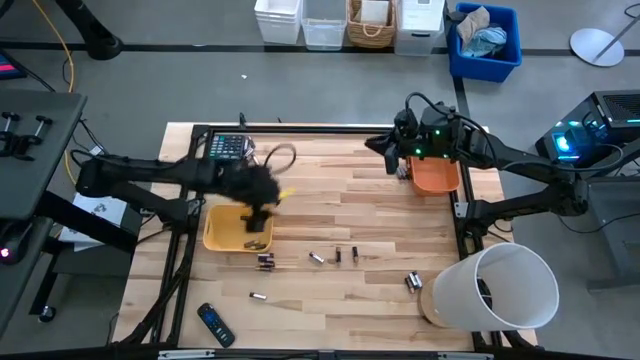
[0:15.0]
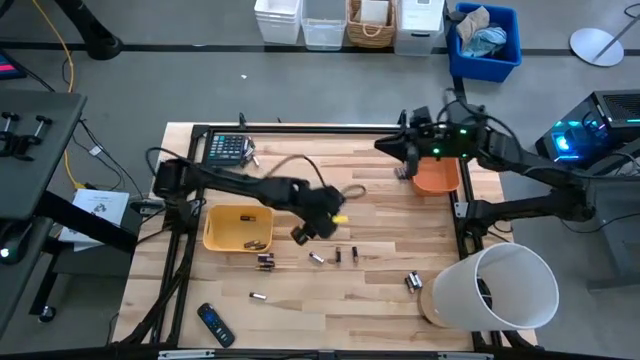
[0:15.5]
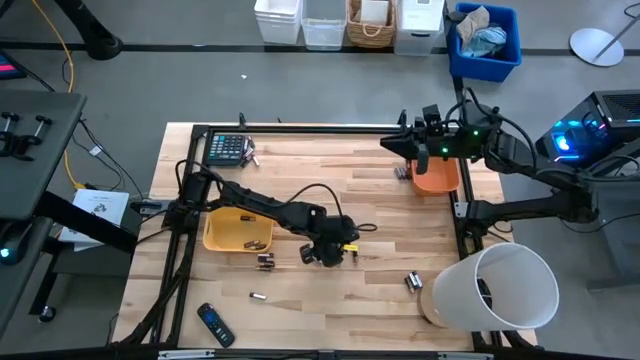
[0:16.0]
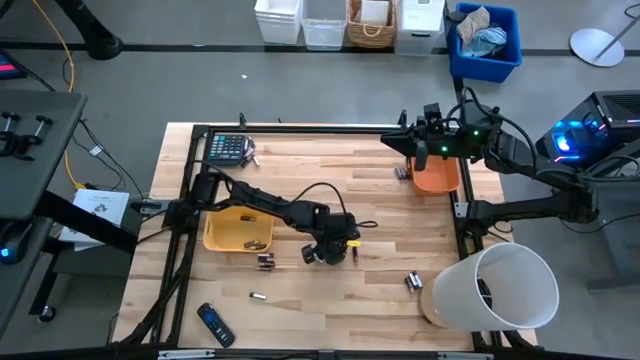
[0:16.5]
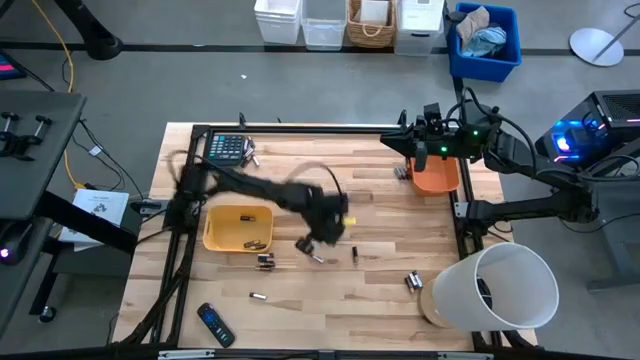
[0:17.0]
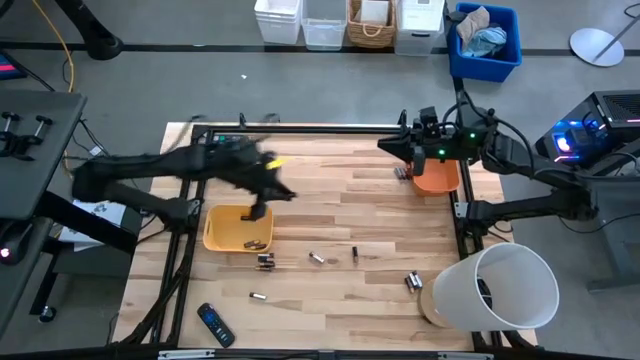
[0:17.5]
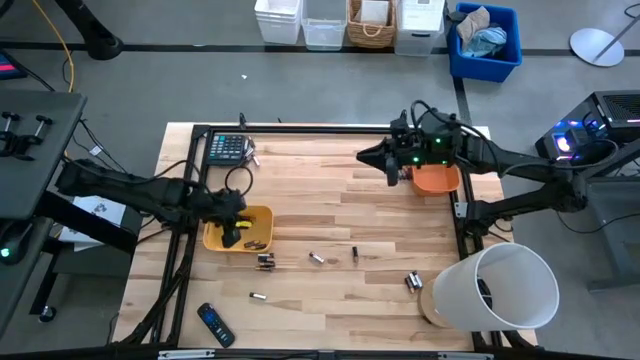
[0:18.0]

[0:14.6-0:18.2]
Task: Sort batteries
Put the black battery into the yellow bin

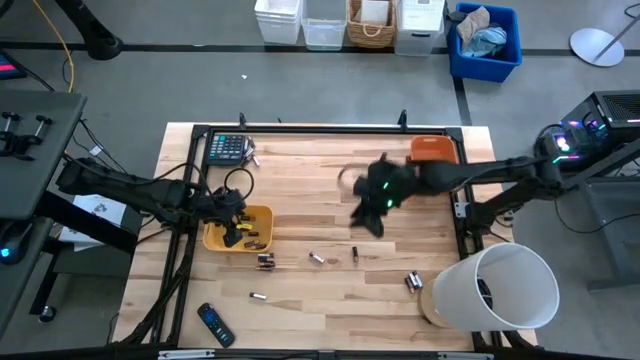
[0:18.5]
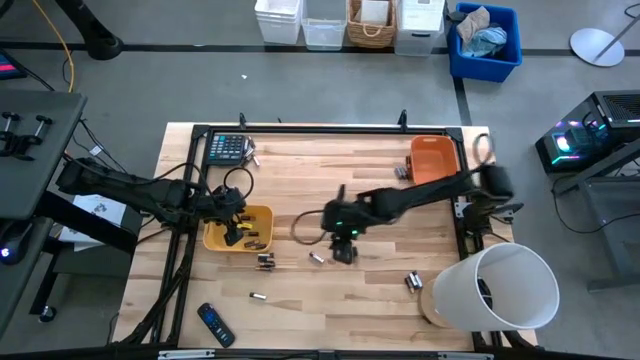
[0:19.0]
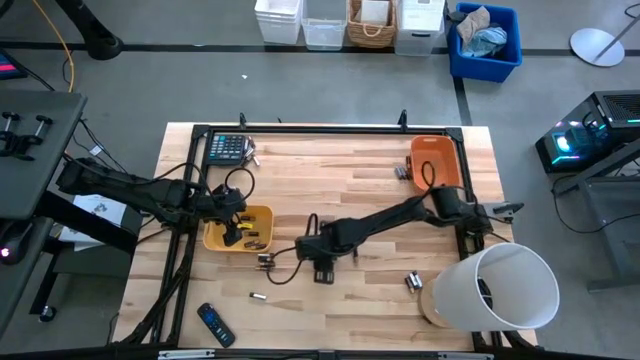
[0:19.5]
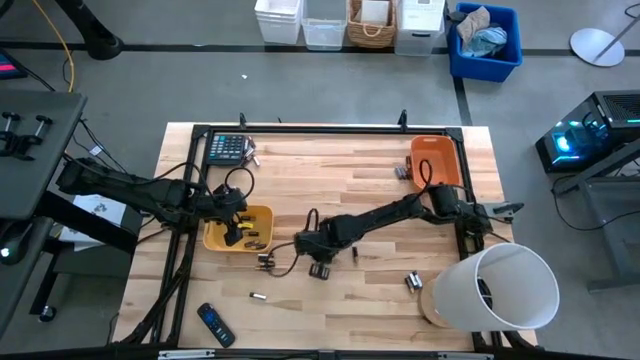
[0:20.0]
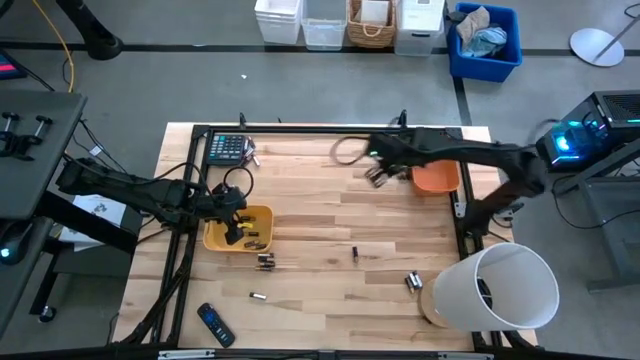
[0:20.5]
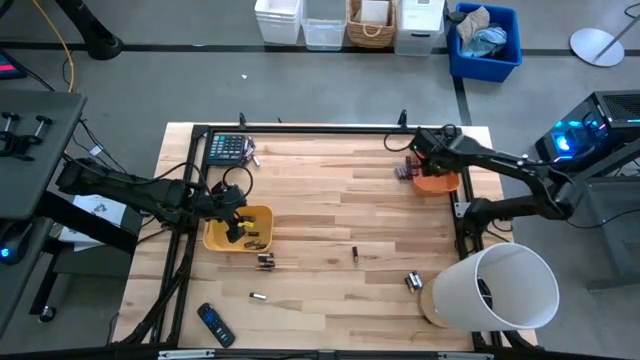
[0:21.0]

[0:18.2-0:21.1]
Put the silver battery into the orange bin

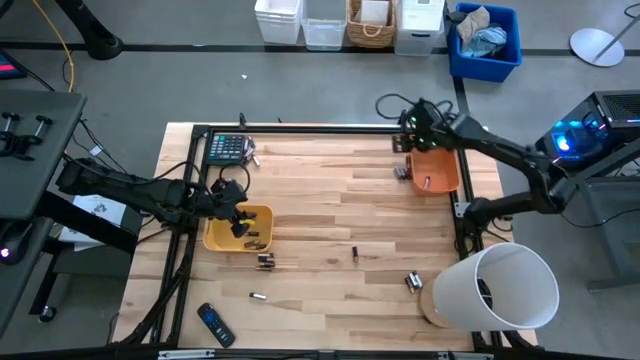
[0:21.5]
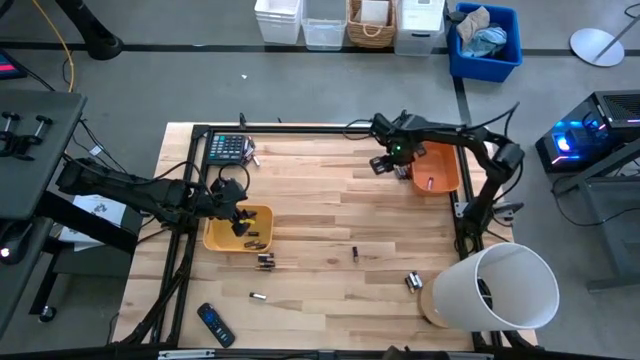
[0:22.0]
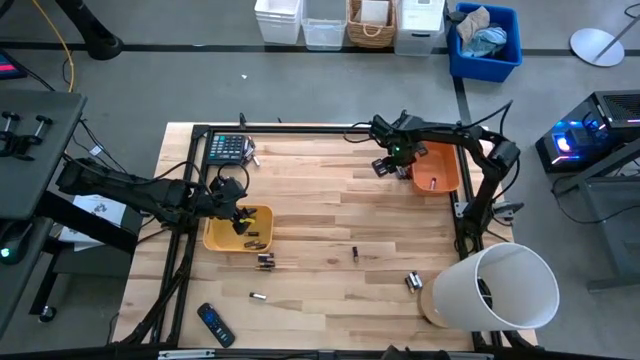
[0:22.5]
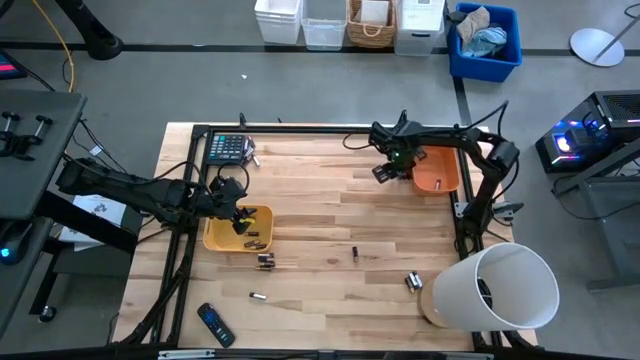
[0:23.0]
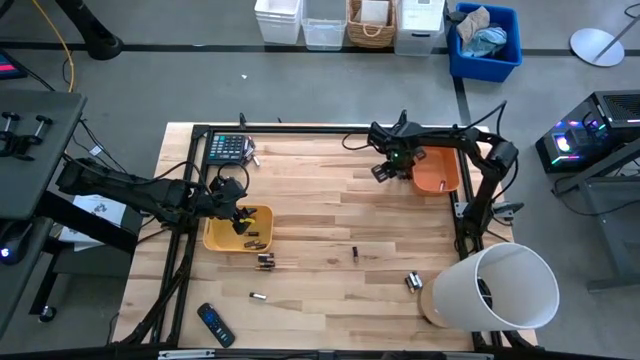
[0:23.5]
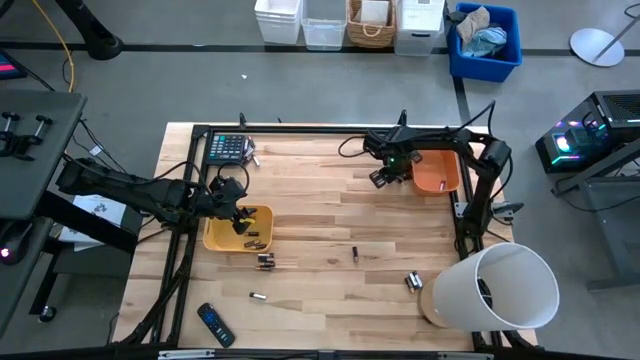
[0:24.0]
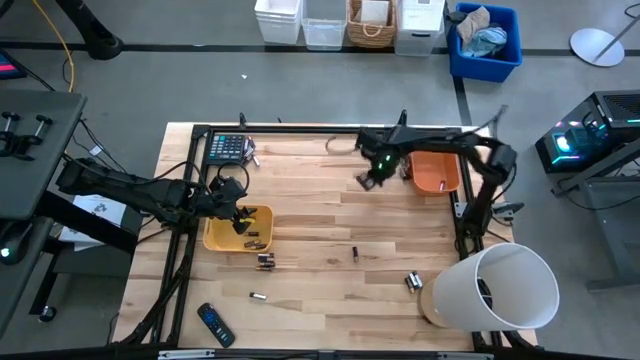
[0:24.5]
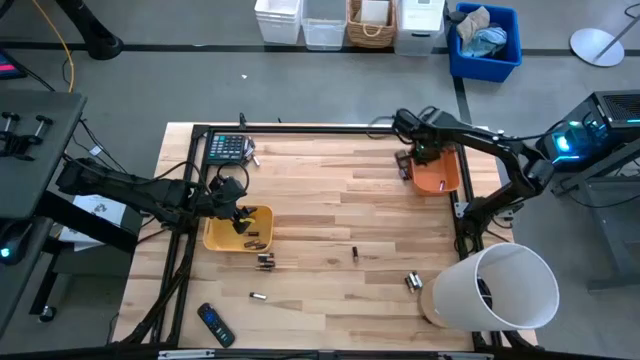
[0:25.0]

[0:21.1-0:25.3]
Put the silver battery into the orange bin

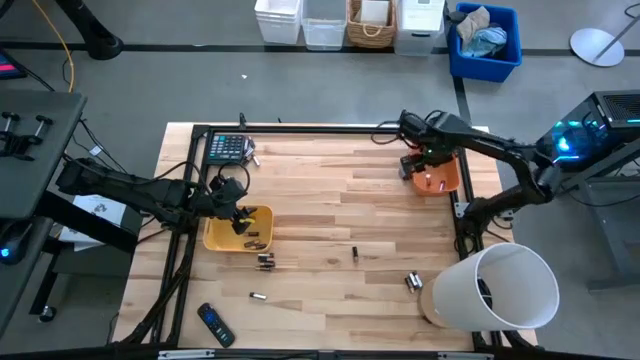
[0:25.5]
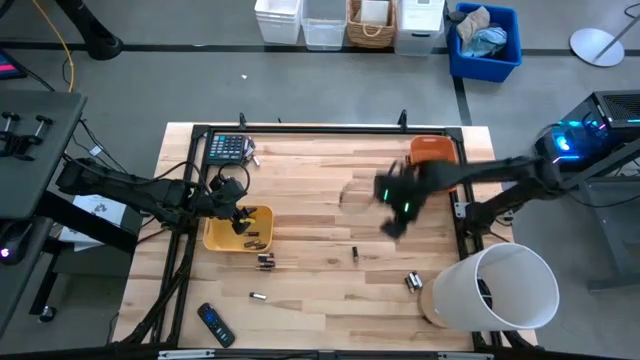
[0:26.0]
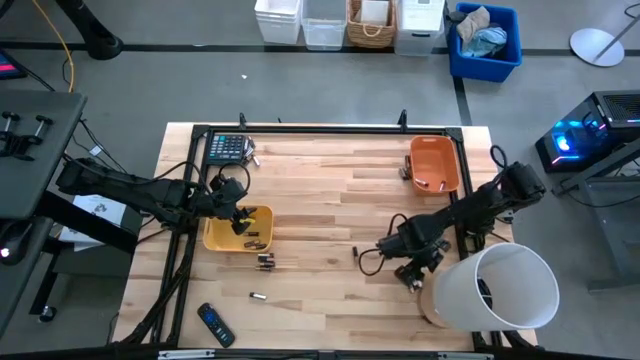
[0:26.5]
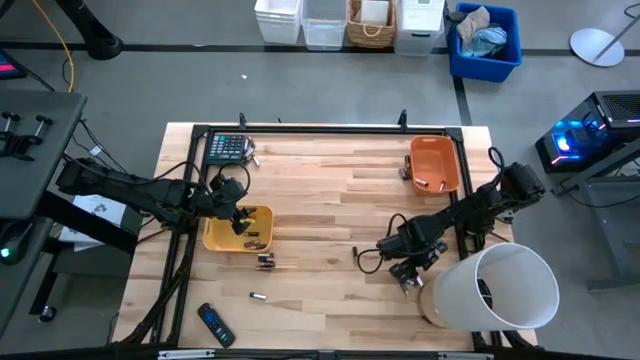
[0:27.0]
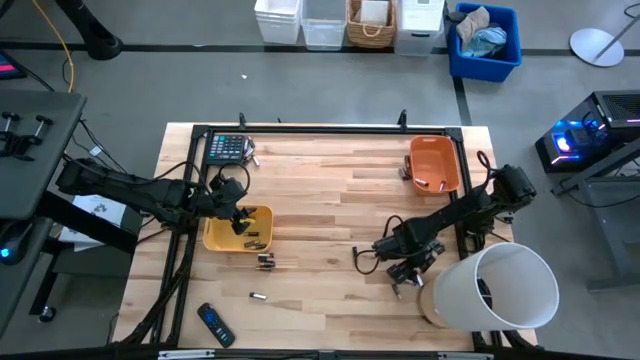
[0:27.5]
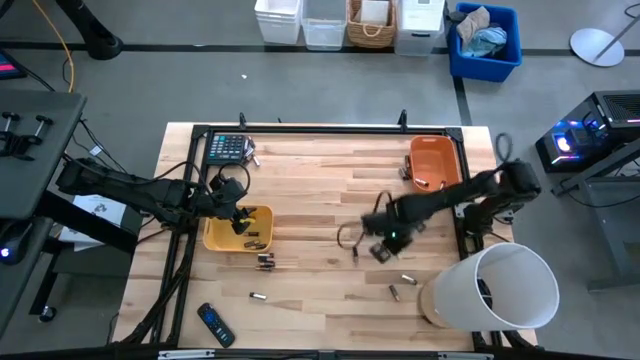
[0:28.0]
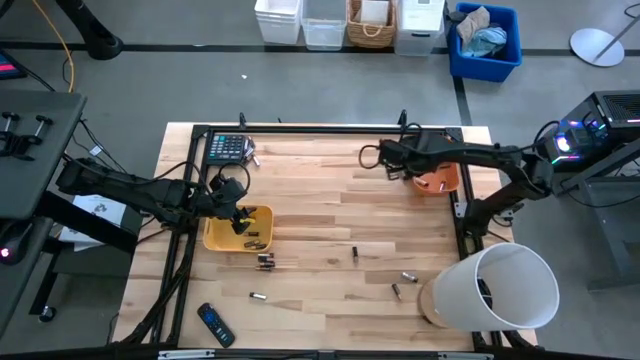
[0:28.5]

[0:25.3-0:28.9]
Put the silver battery into the orange bin

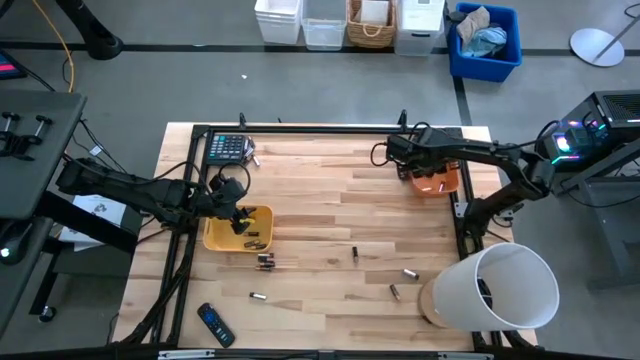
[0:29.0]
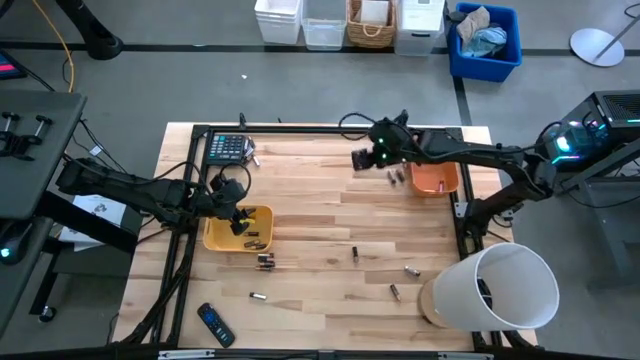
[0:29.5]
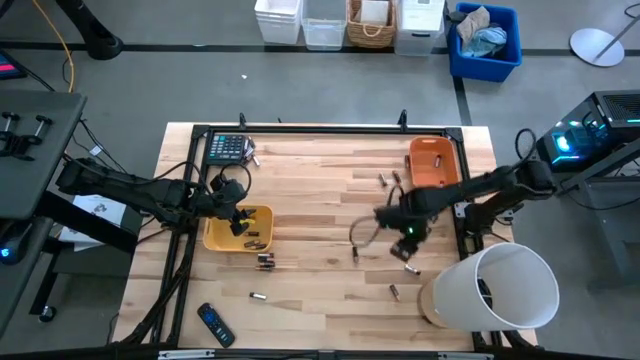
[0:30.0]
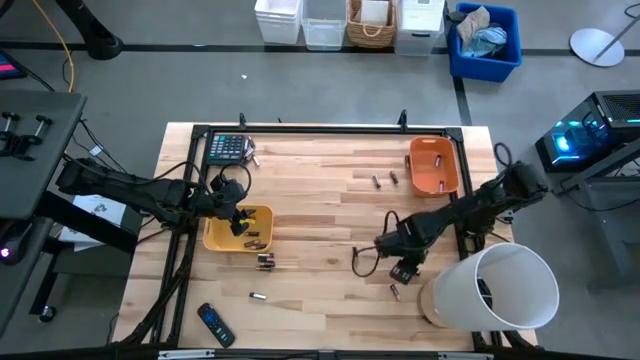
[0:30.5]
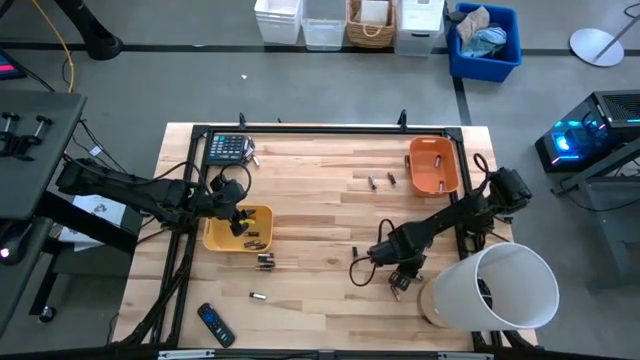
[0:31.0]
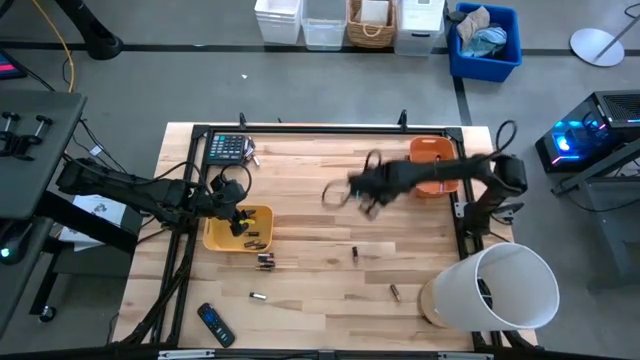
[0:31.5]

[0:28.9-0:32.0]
Put the silver battery into the orange bin

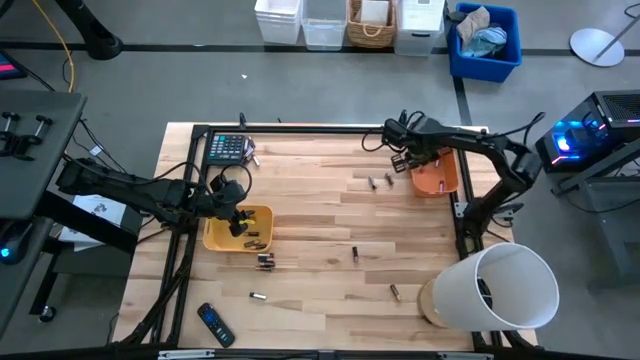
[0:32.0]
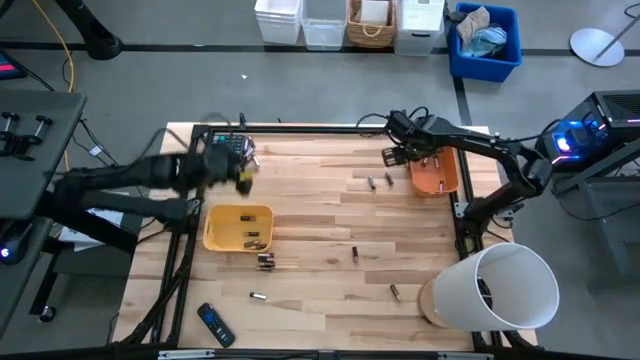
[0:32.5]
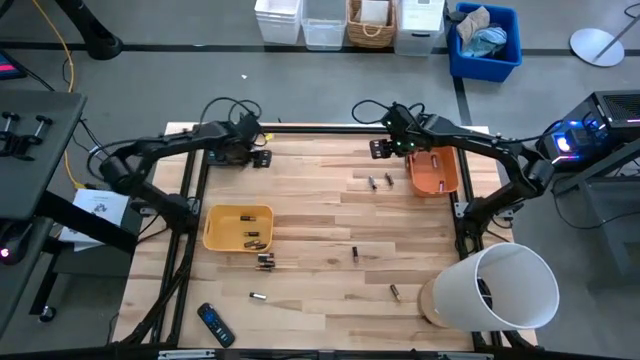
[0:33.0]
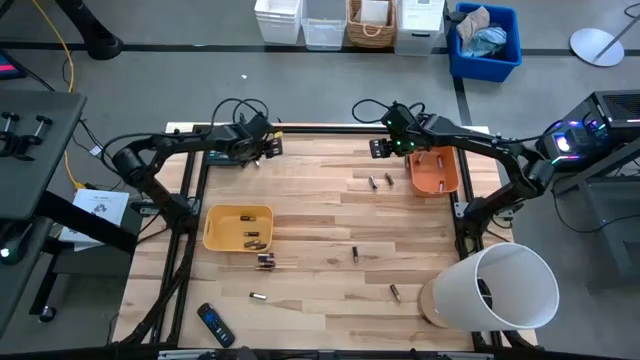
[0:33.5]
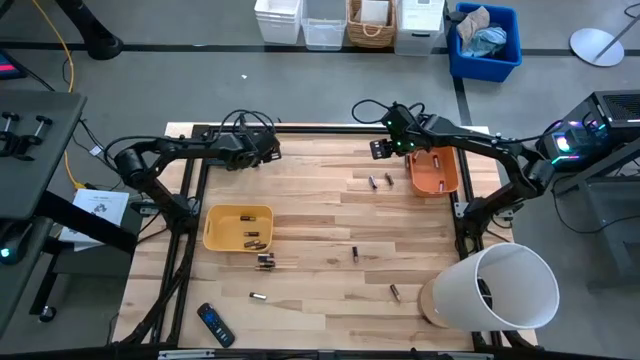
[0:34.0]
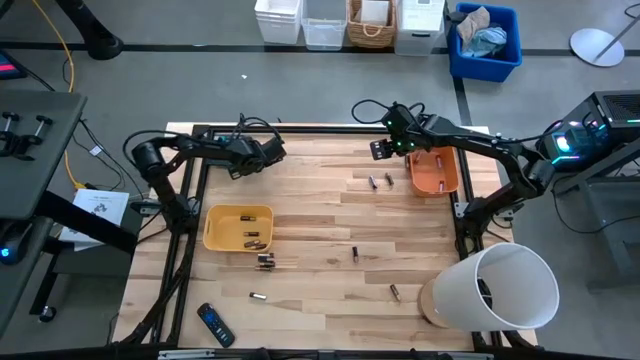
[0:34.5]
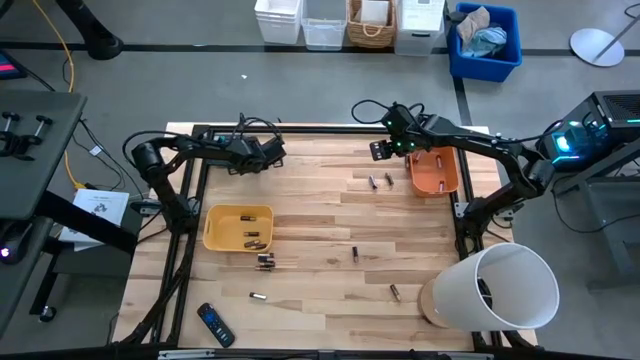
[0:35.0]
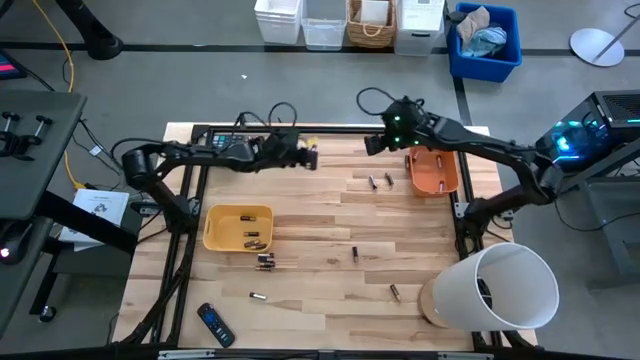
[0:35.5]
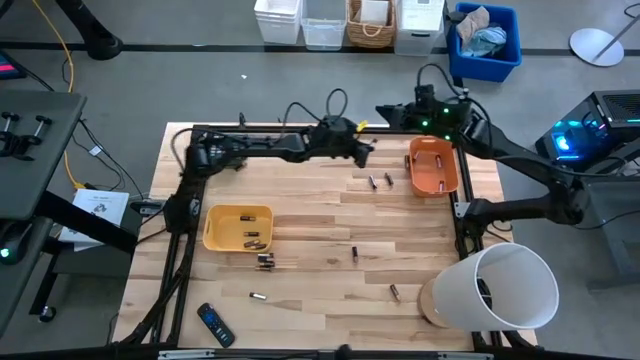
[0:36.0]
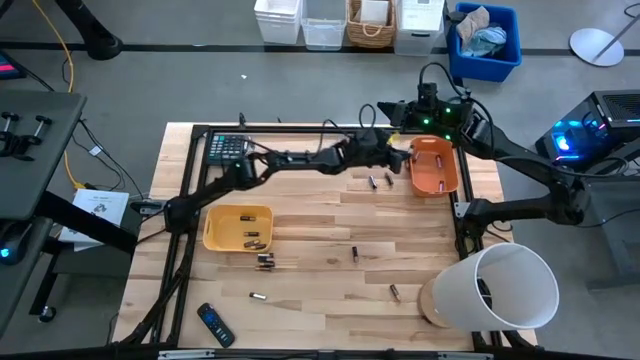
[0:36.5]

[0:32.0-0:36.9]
Put the silver battery into the orange bin
